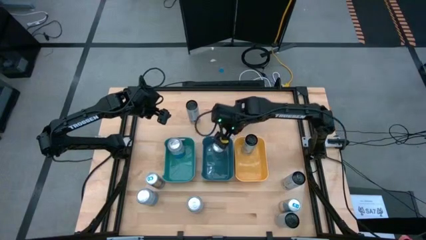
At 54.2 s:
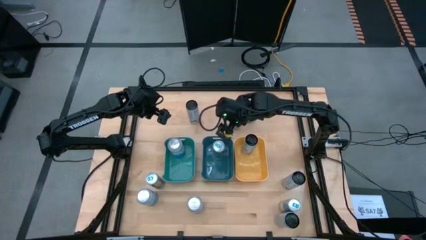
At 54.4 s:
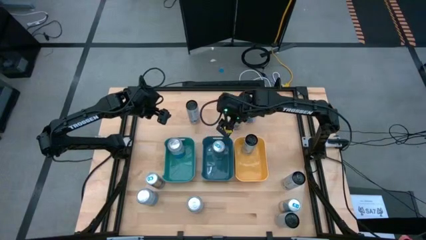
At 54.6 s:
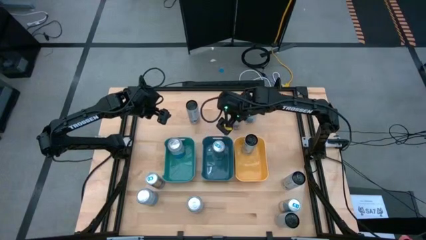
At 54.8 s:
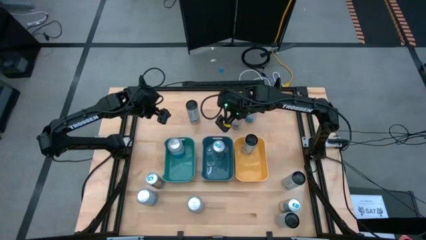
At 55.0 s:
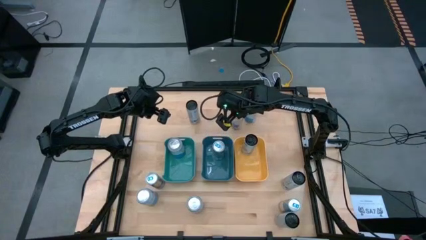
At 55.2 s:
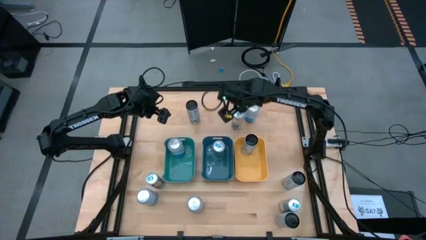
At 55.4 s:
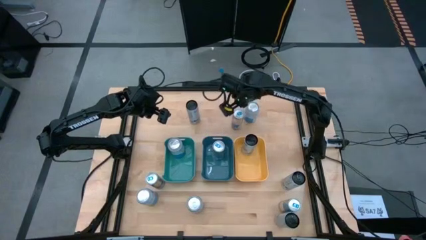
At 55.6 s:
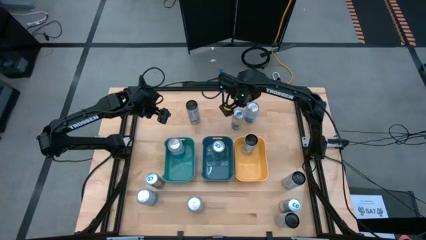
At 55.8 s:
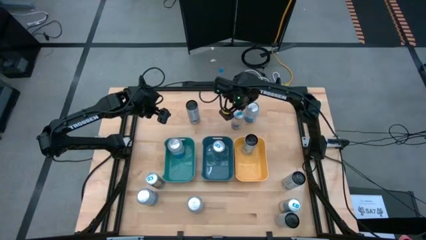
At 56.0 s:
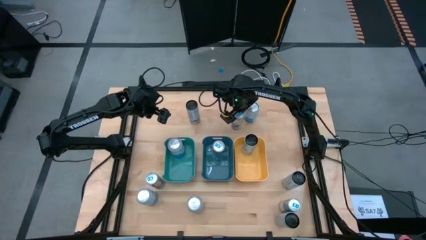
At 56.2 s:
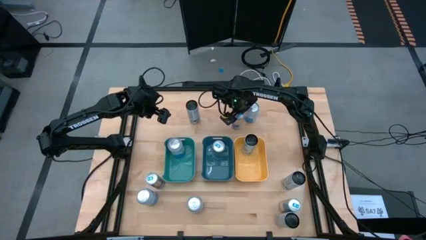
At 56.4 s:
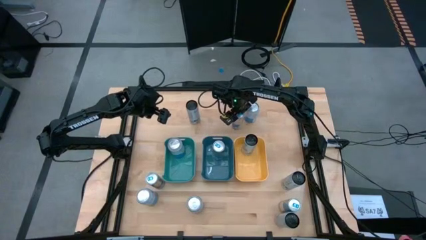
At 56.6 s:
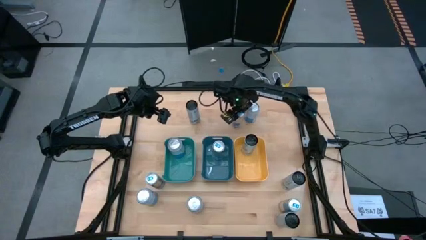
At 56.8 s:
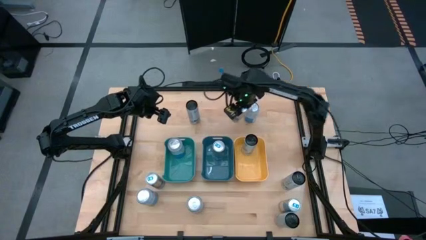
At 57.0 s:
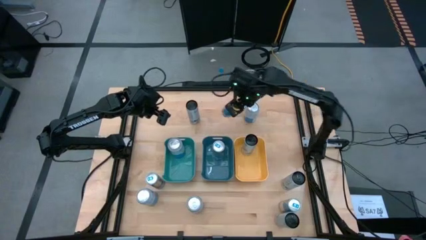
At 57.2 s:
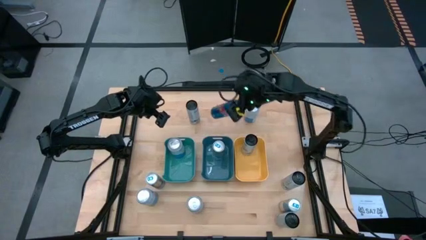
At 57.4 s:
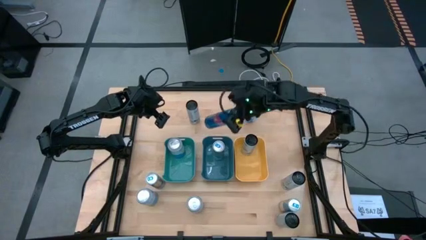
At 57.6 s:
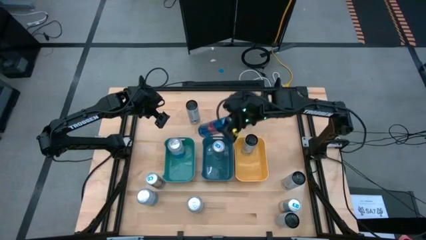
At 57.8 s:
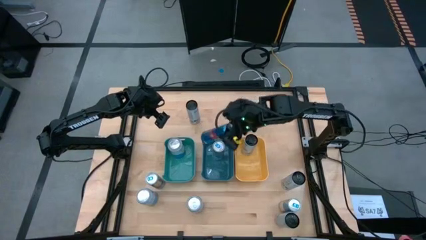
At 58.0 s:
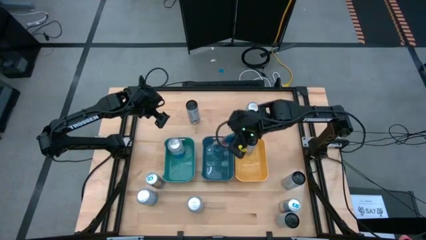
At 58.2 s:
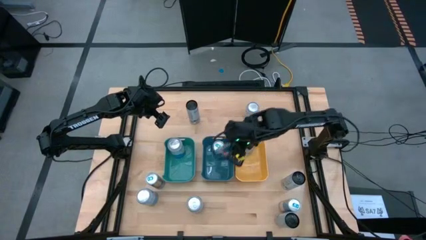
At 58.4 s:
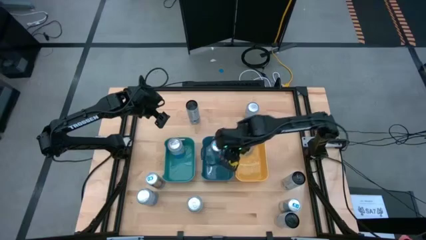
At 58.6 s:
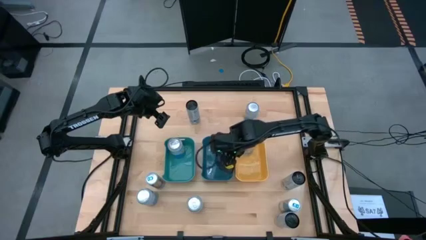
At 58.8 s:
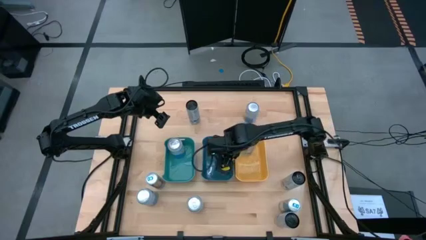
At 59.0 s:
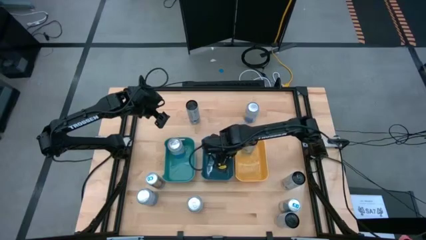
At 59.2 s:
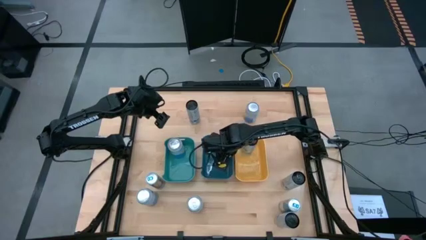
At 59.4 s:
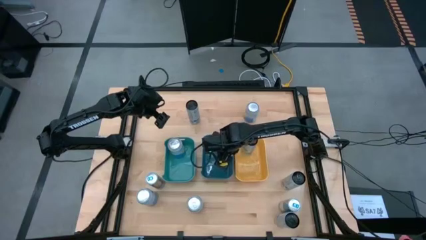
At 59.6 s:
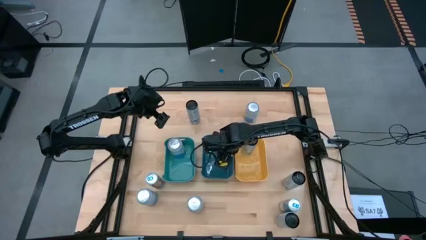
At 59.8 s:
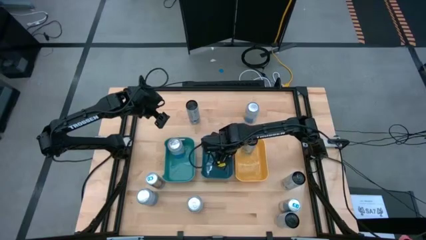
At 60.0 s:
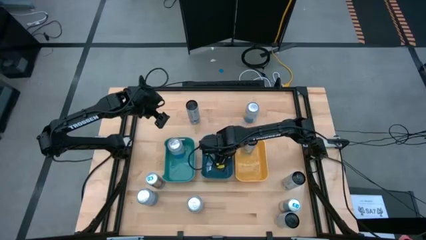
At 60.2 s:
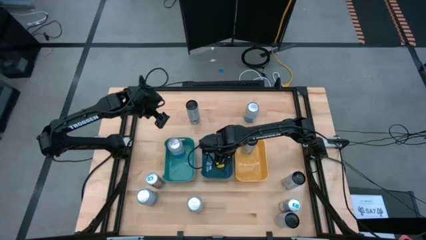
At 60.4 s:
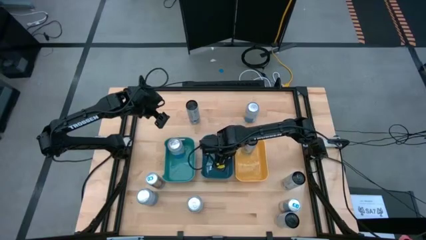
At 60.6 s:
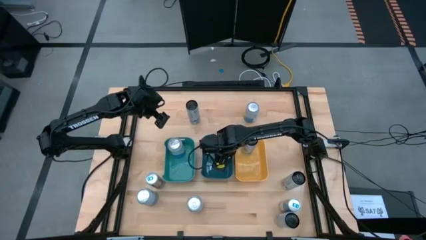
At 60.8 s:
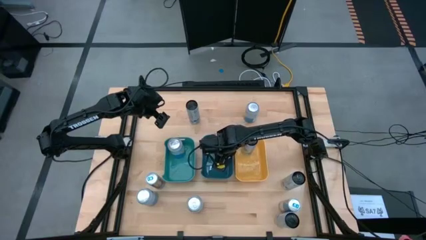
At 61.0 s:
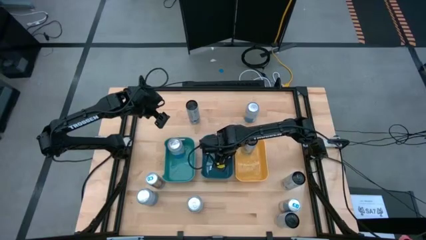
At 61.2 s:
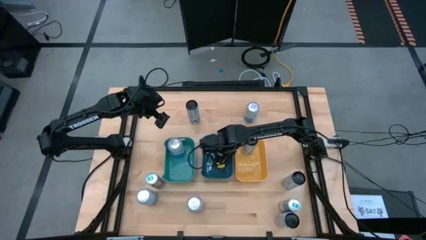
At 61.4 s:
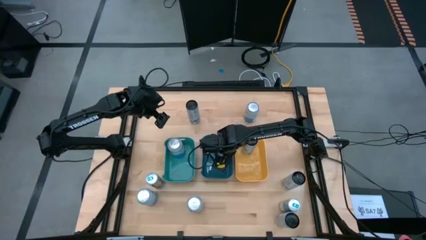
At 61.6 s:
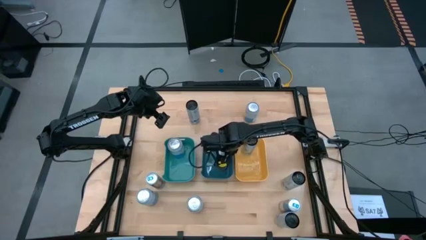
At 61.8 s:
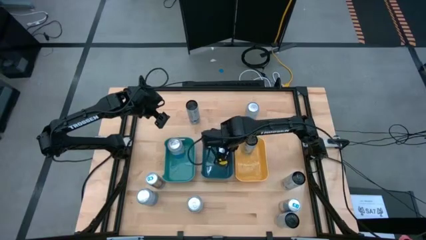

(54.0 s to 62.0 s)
Task: Sort soda cans
Put the blue soda can into the blue bin

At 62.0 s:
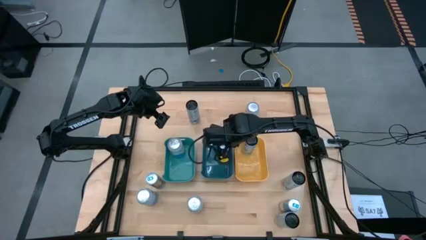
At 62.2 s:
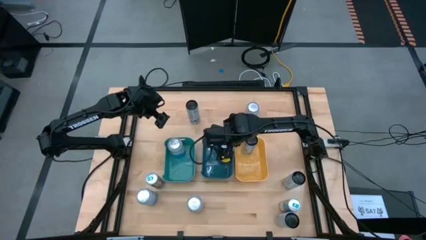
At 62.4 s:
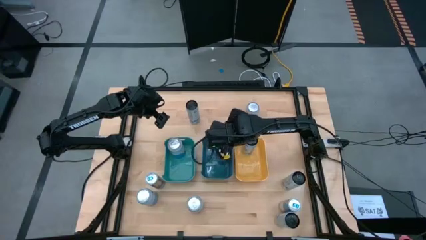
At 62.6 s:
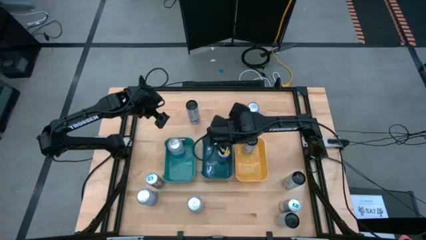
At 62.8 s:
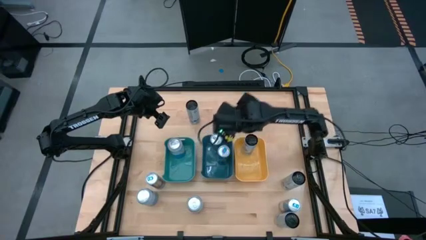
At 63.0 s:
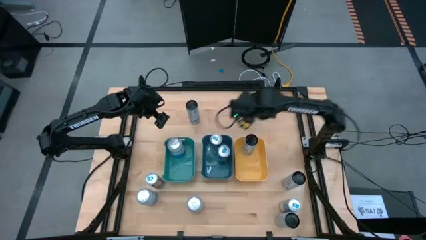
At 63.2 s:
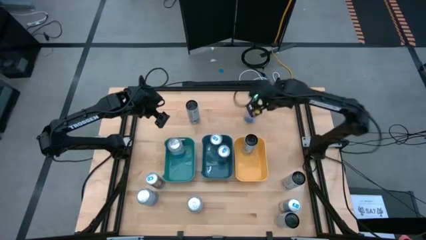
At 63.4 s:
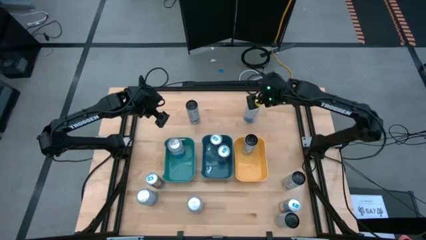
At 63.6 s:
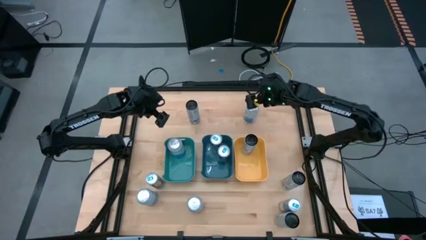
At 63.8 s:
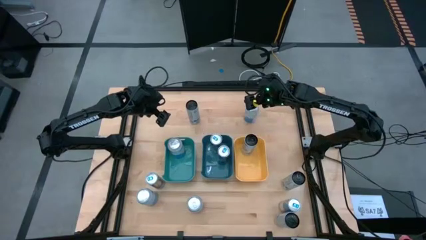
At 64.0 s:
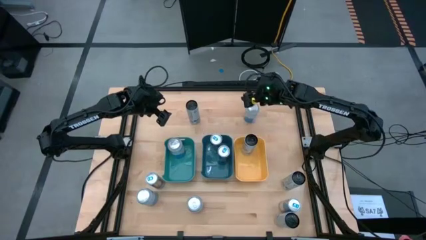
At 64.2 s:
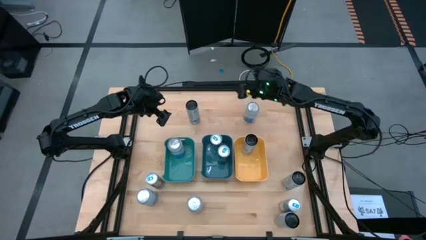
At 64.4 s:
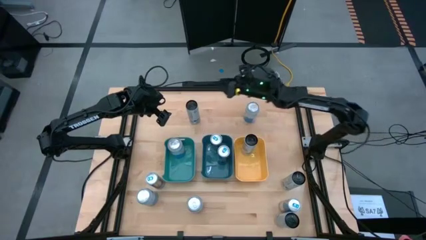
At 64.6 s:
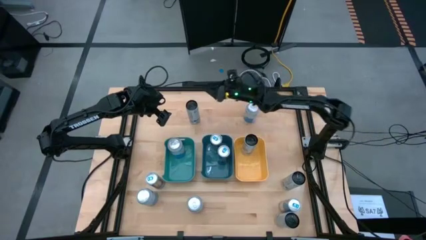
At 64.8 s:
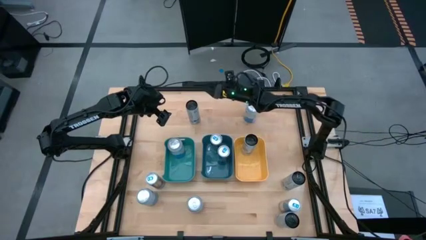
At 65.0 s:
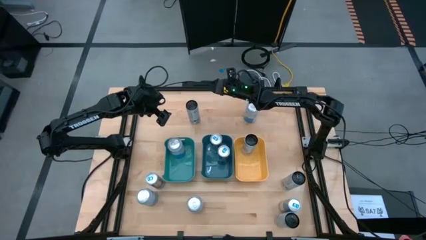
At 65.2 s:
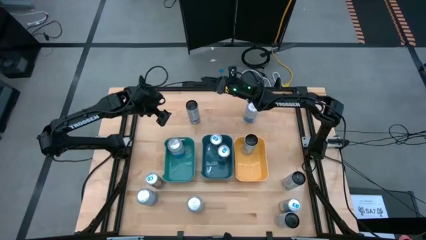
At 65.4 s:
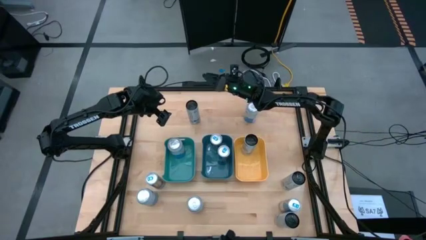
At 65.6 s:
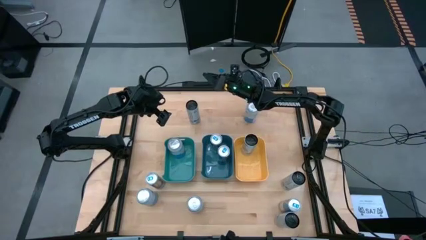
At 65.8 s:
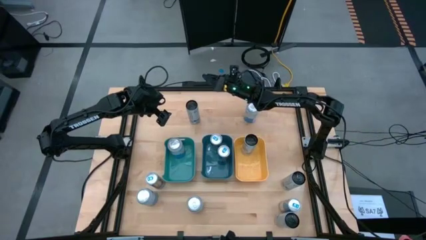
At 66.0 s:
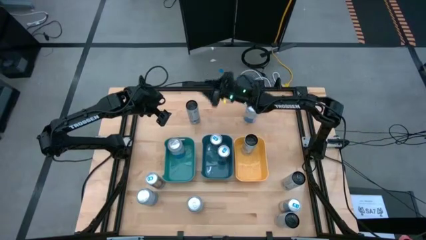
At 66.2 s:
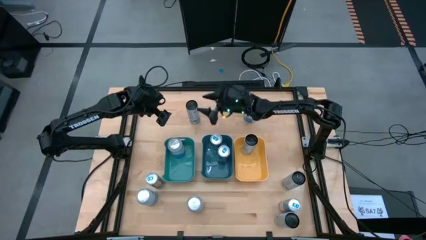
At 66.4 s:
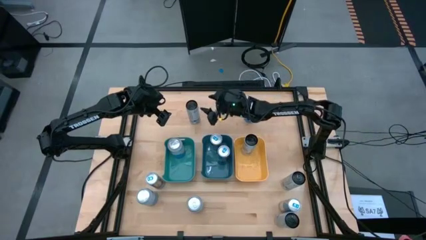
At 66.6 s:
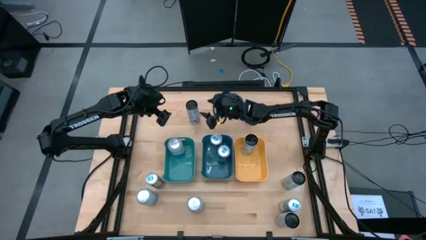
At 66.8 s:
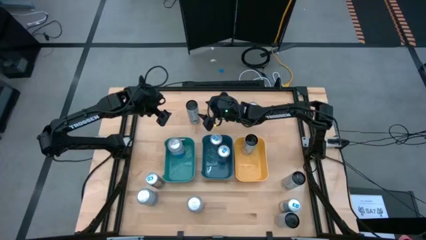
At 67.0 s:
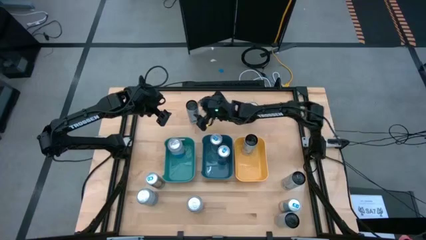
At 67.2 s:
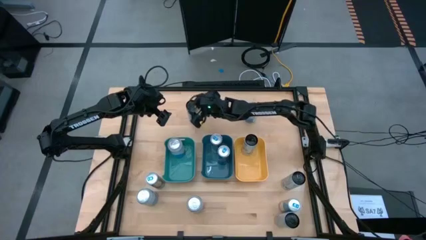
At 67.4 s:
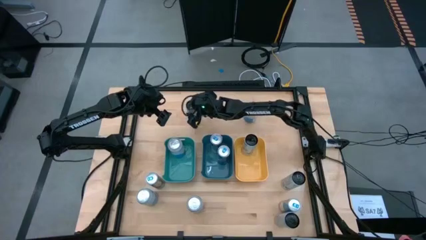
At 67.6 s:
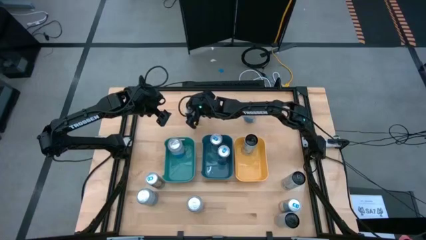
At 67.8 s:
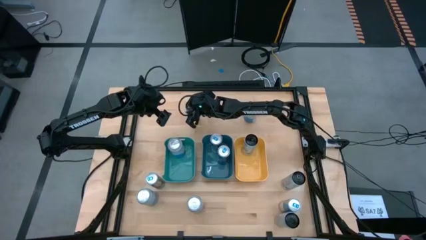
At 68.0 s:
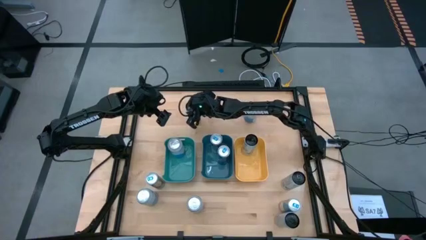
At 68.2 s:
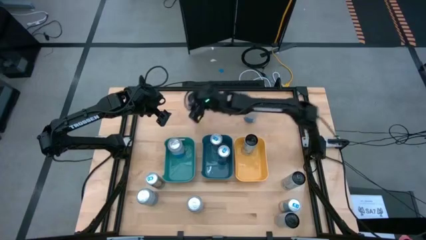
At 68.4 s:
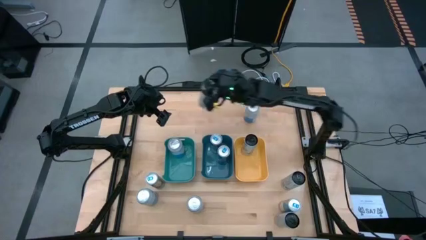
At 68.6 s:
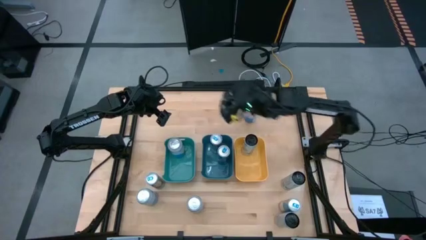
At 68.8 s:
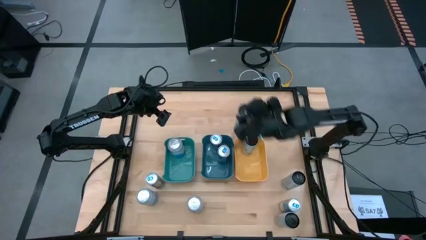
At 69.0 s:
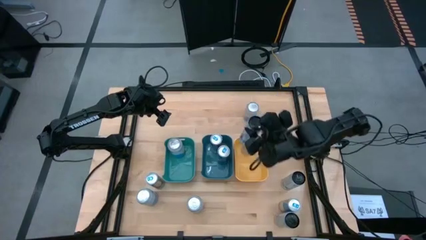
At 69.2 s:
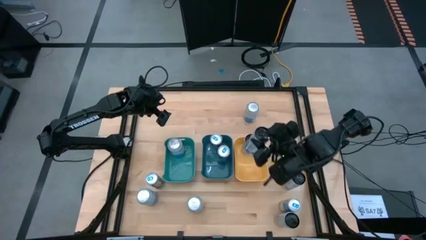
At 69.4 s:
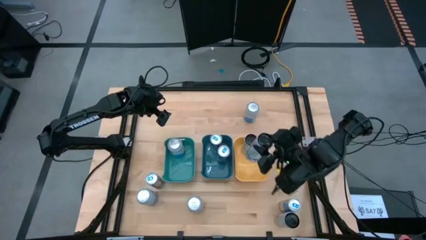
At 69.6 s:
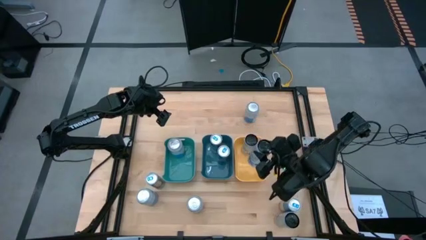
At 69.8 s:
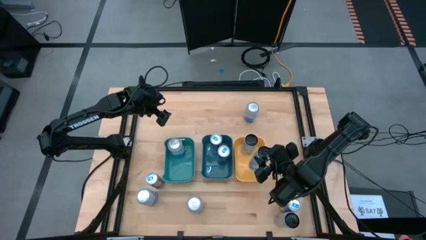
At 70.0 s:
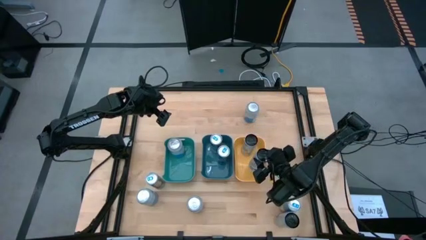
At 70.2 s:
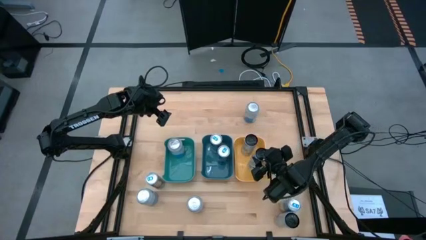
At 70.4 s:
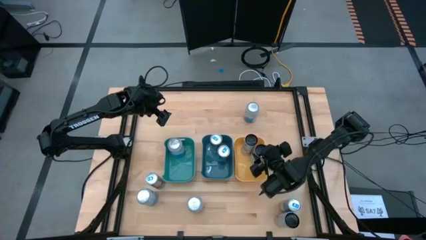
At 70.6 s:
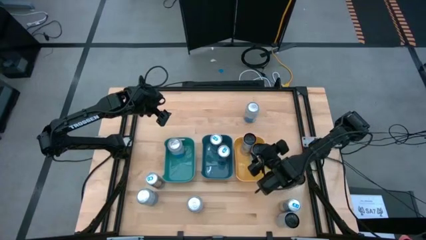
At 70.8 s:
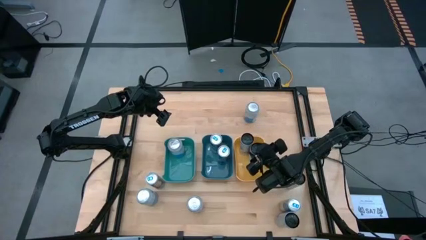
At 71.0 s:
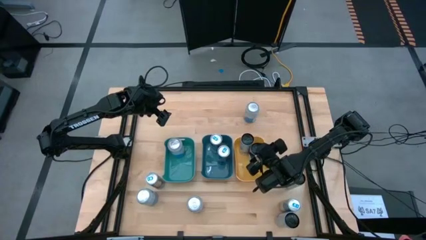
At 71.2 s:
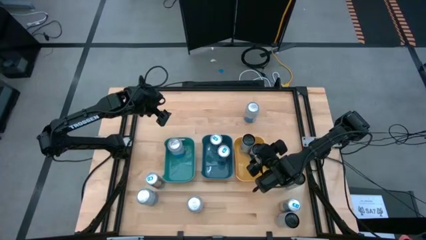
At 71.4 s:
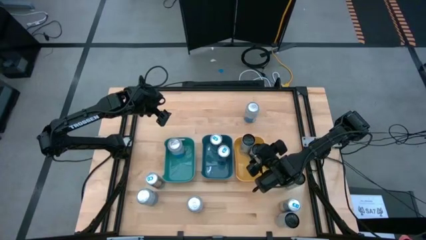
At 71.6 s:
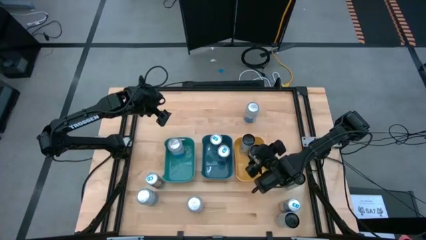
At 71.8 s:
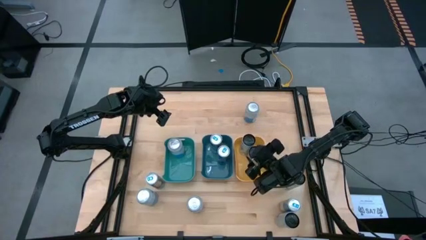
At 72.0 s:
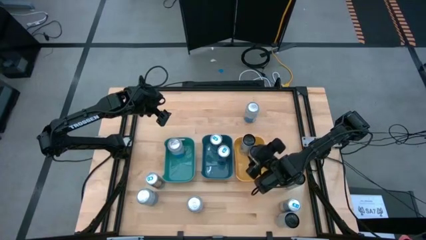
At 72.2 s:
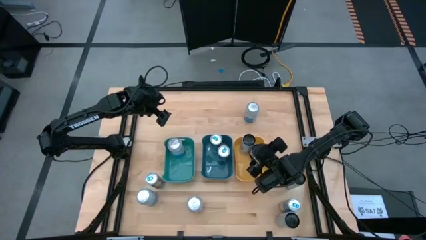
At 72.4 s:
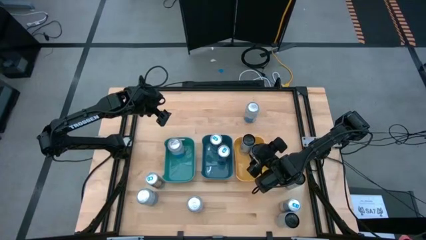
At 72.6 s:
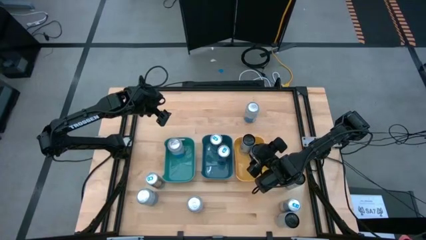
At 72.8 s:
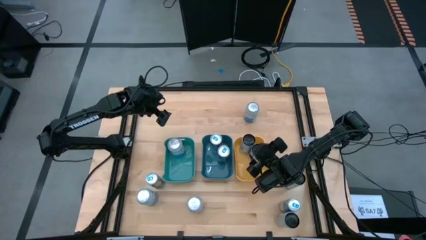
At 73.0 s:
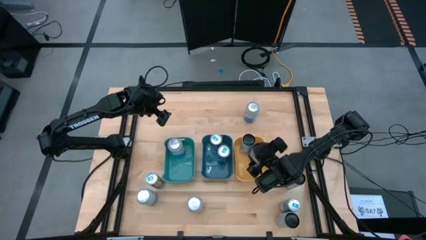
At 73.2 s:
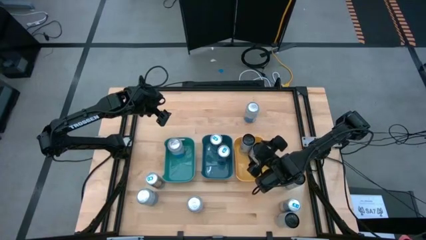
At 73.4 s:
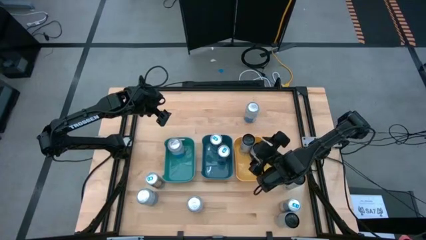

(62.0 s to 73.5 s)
Put the white-blue soda can into the yellow bin
